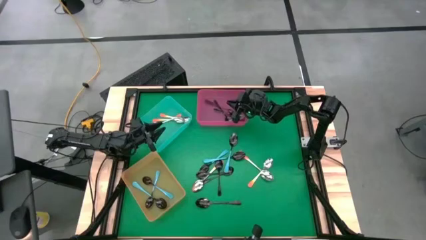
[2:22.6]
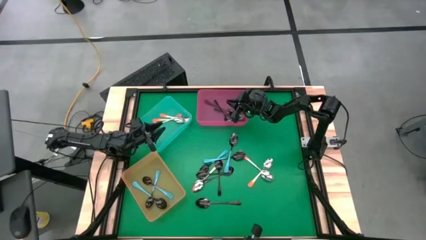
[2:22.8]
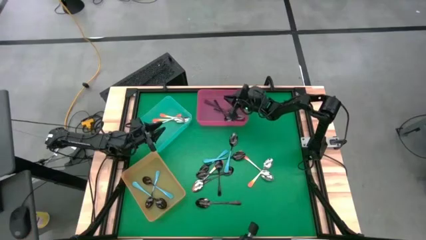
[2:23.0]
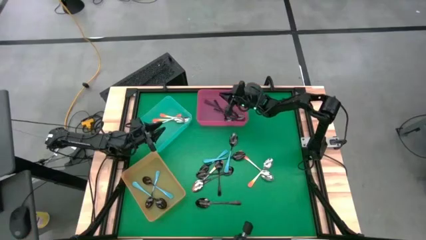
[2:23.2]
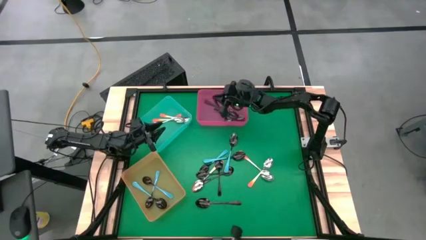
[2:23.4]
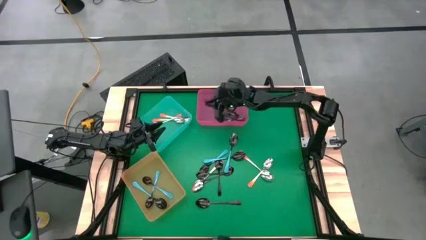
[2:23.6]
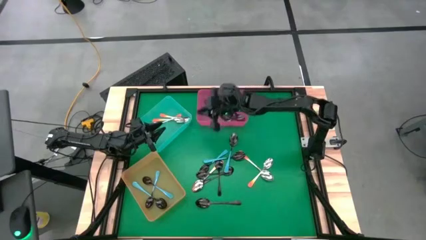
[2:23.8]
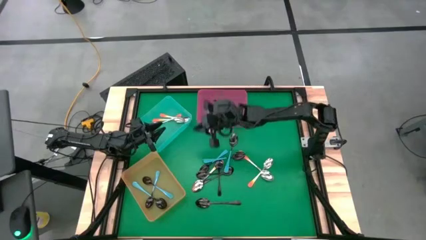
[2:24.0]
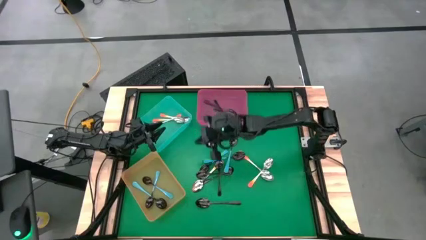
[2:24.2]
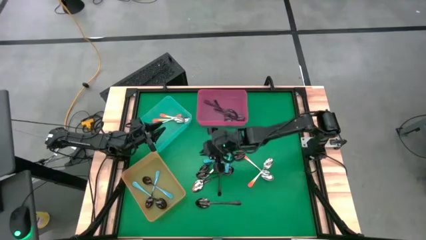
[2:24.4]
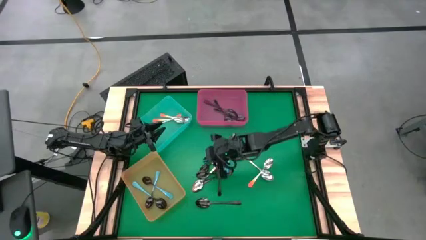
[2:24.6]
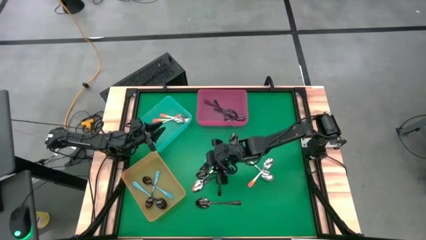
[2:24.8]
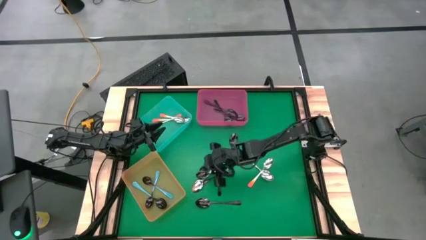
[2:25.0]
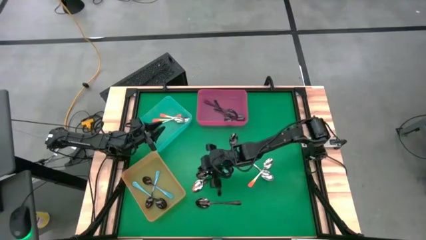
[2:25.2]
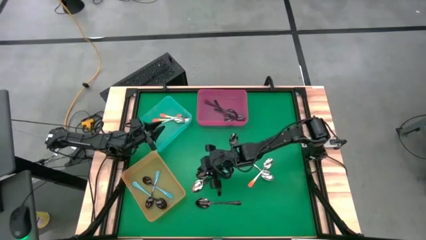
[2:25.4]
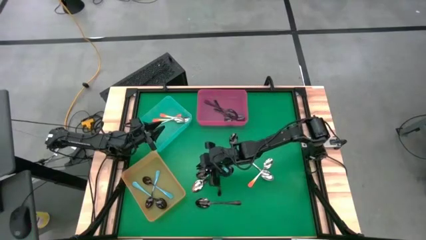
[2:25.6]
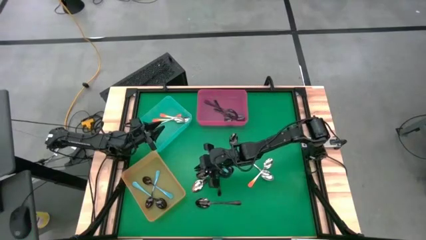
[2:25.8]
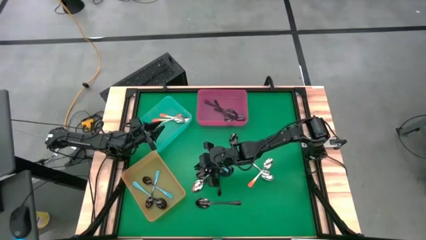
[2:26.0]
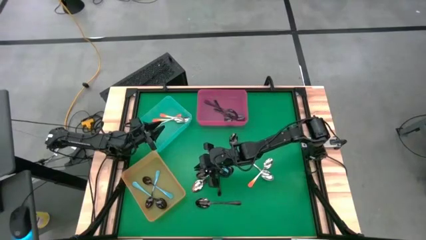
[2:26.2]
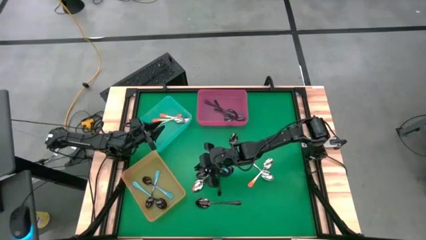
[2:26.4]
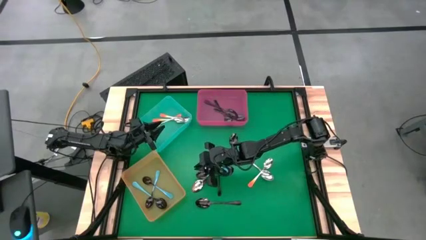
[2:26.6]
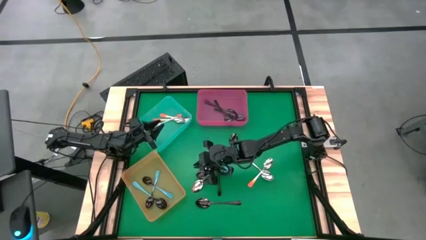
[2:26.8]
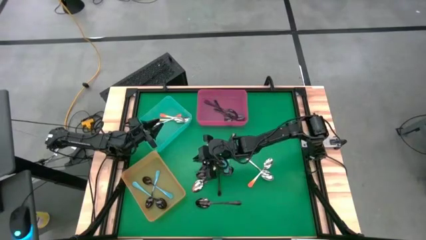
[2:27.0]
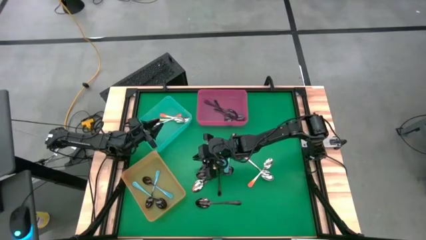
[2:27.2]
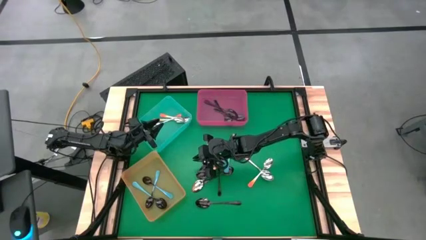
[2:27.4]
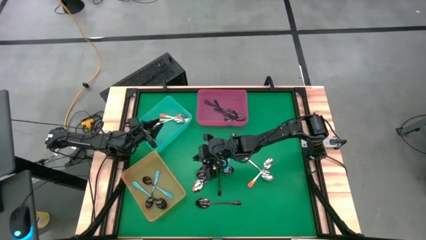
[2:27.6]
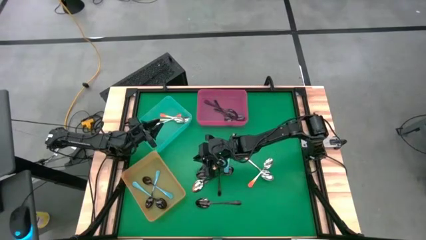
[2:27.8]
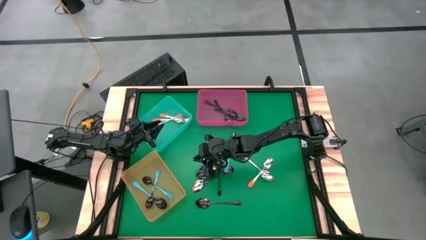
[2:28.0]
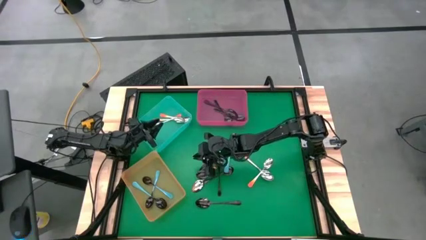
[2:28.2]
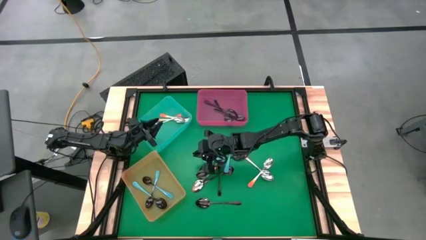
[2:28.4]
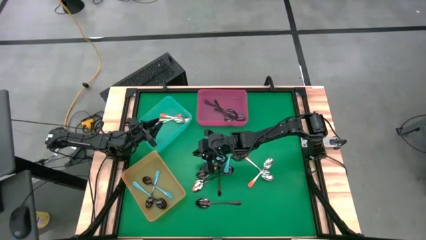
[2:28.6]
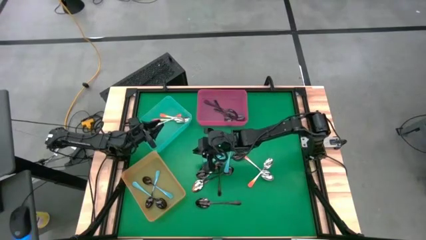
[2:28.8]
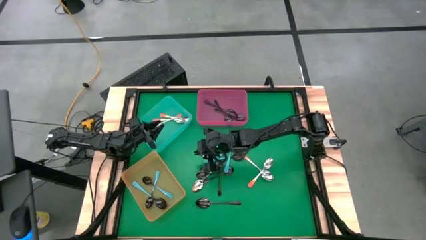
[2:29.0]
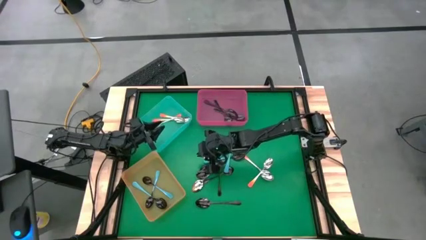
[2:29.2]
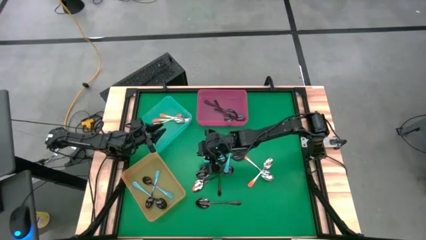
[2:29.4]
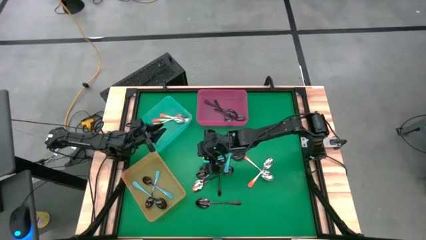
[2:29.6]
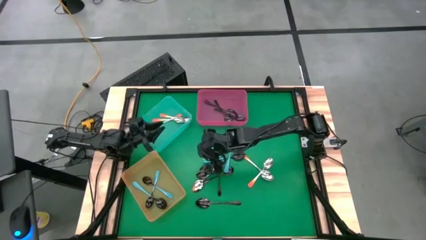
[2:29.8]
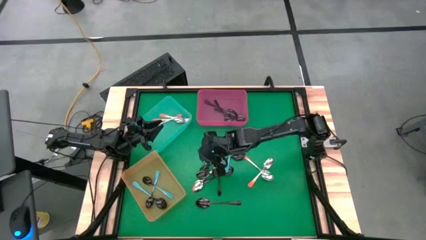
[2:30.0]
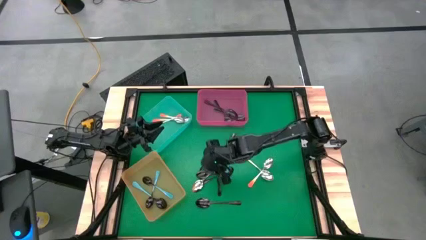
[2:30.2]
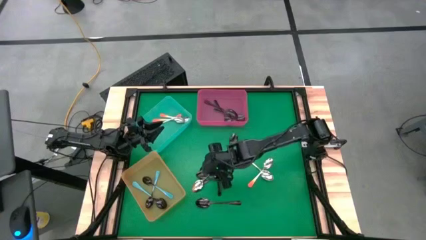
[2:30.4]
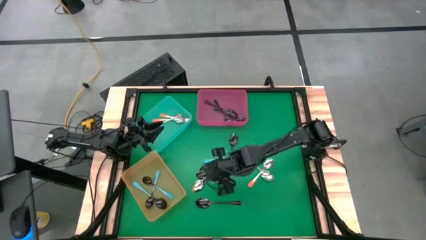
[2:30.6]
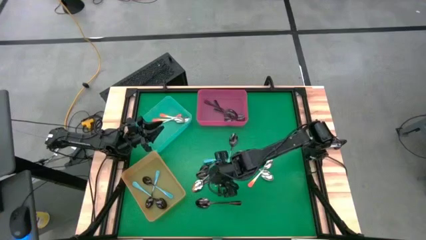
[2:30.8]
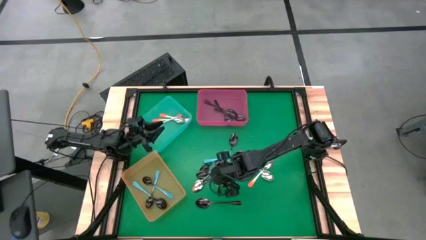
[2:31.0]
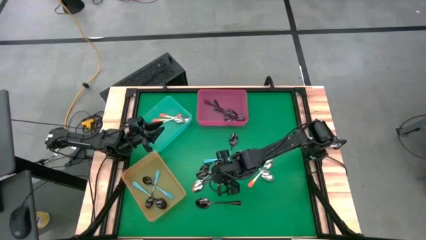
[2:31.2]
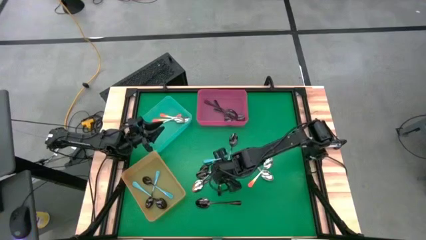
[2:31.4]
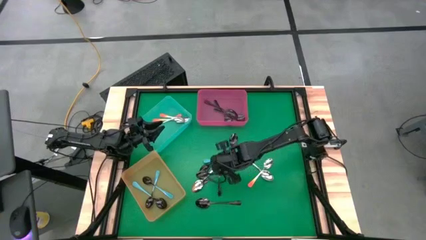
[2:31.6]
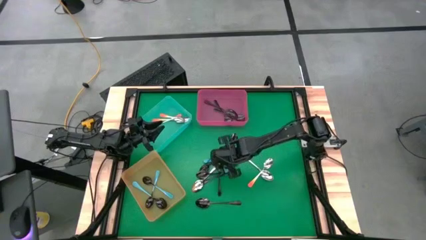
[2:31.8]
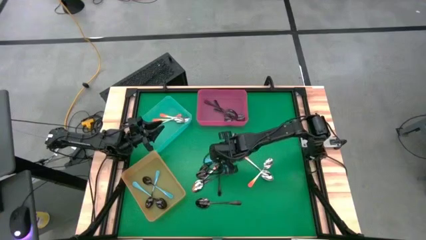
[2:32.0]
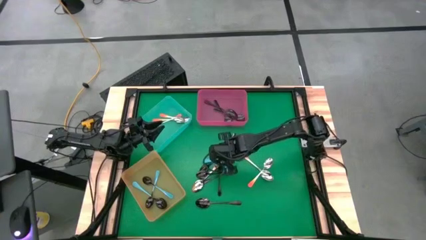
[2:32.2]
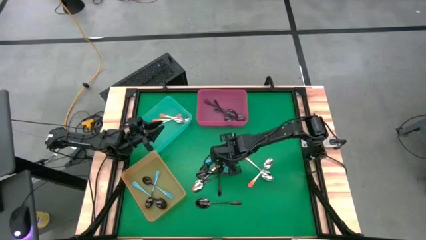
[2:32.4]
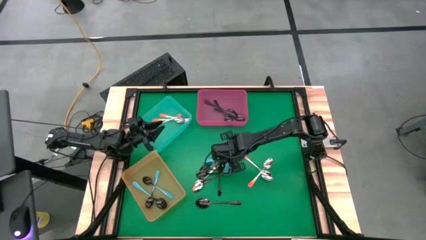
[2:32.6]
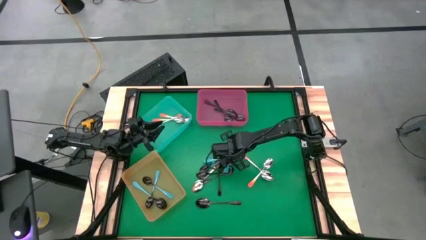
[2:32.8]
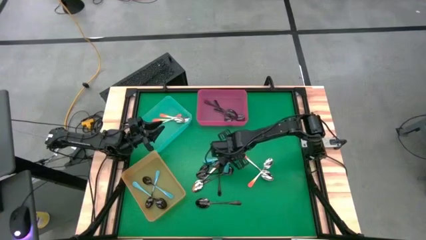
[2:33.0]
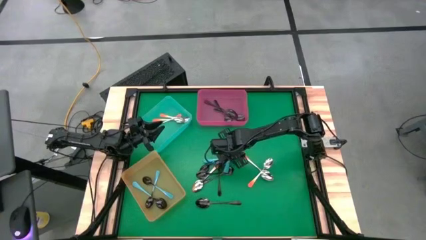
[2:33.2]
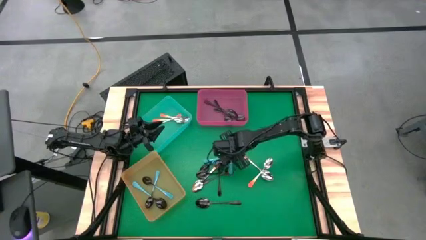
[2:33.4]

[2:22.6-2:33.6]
Task: Sort silverware by color (type)
Put the blue spoon into the orange bin

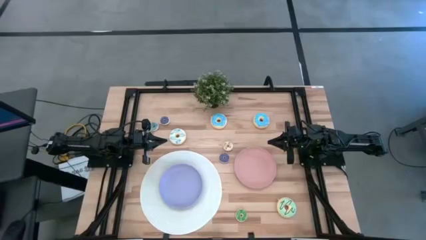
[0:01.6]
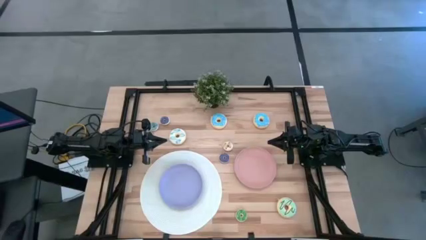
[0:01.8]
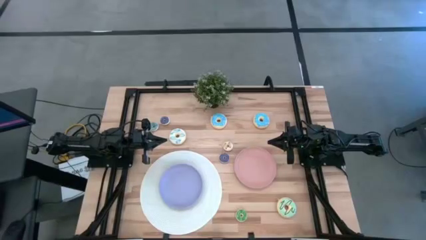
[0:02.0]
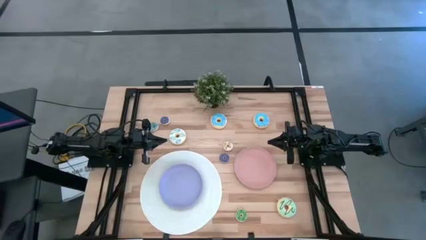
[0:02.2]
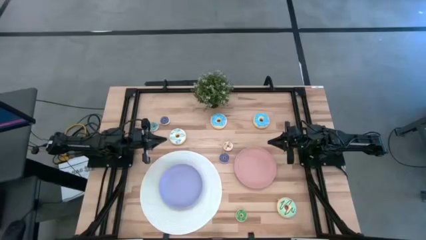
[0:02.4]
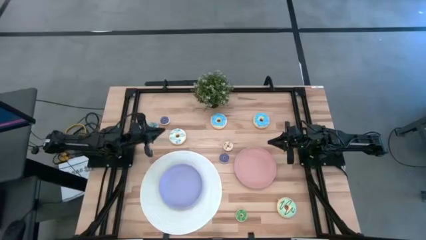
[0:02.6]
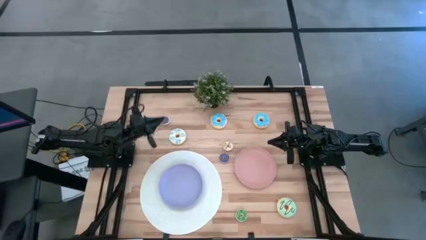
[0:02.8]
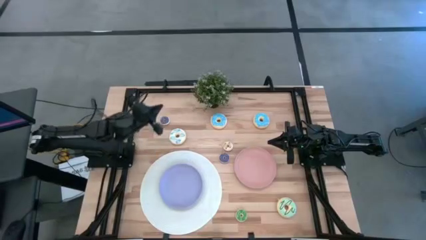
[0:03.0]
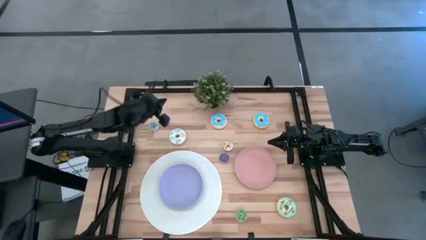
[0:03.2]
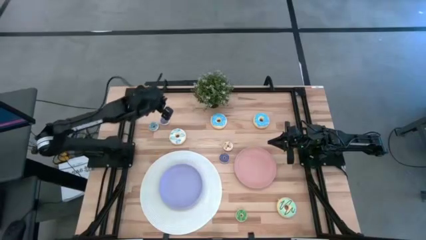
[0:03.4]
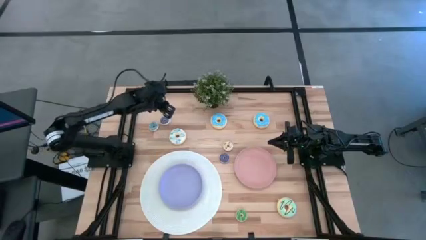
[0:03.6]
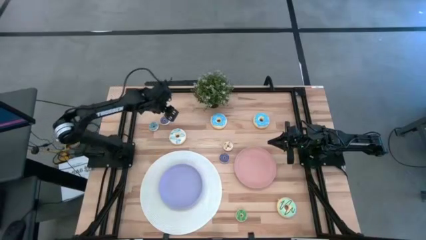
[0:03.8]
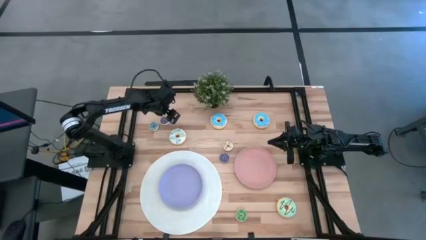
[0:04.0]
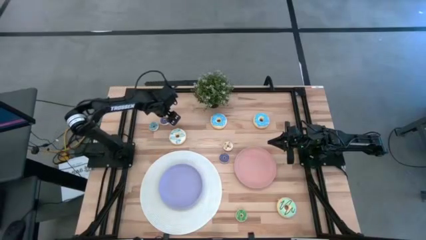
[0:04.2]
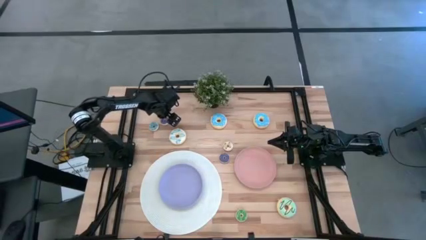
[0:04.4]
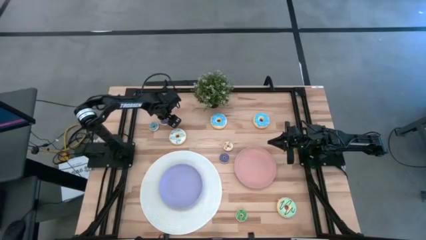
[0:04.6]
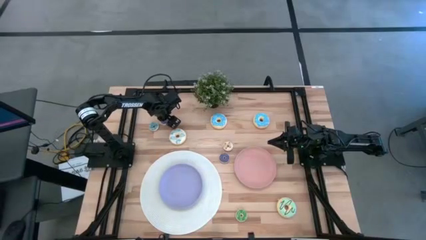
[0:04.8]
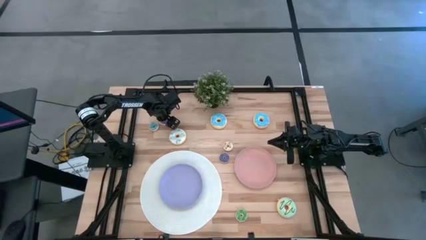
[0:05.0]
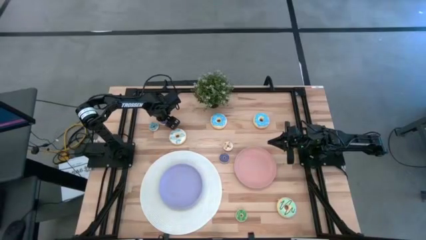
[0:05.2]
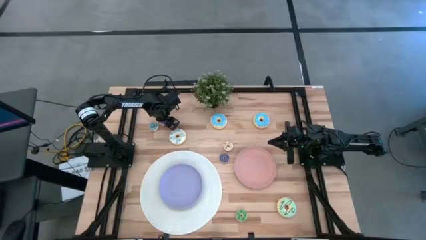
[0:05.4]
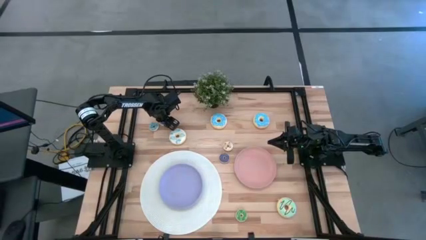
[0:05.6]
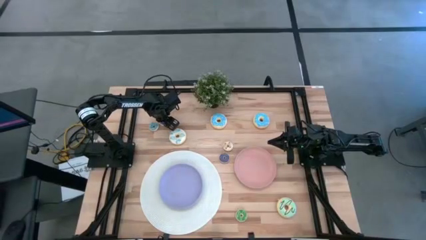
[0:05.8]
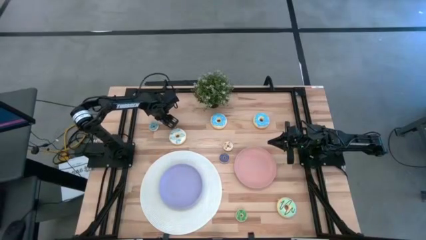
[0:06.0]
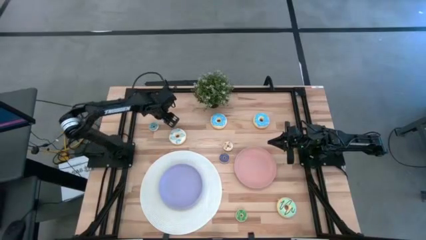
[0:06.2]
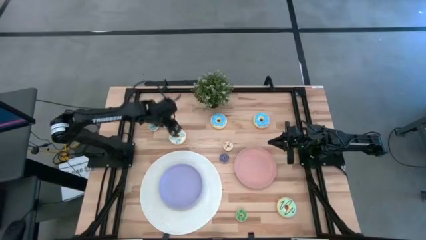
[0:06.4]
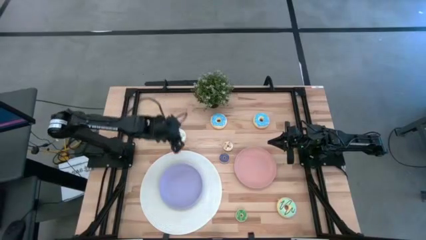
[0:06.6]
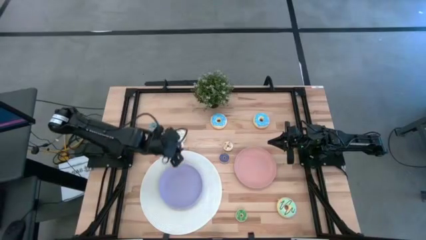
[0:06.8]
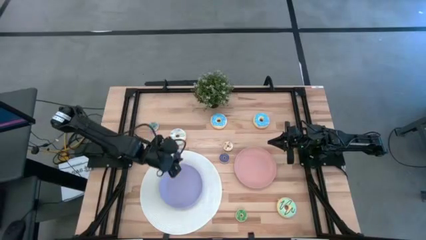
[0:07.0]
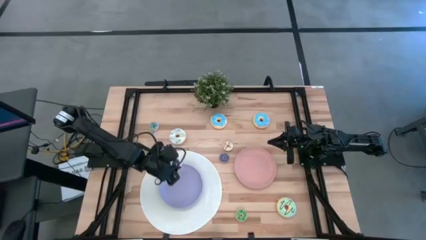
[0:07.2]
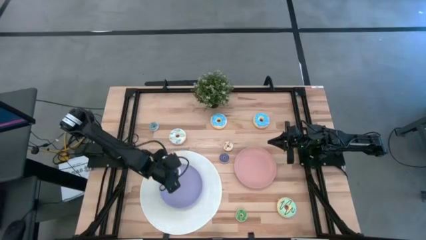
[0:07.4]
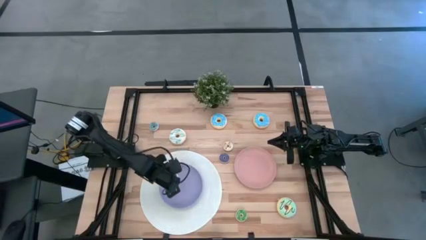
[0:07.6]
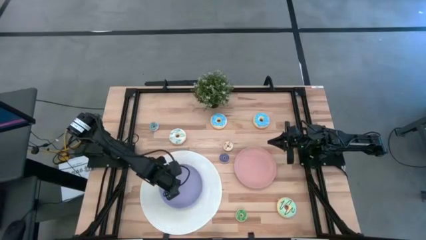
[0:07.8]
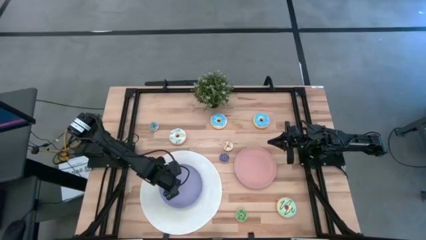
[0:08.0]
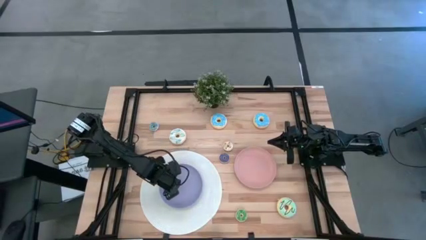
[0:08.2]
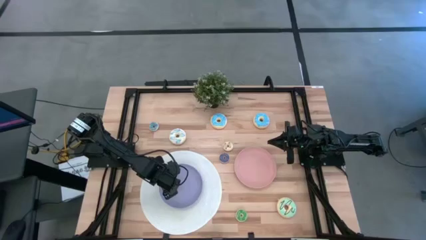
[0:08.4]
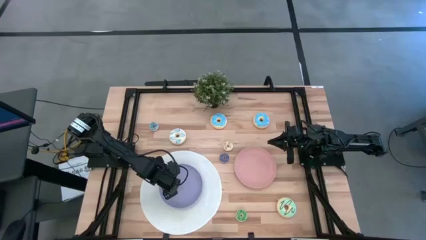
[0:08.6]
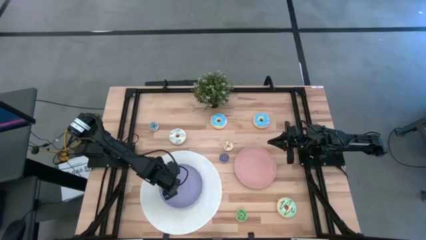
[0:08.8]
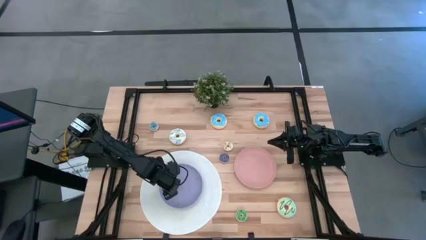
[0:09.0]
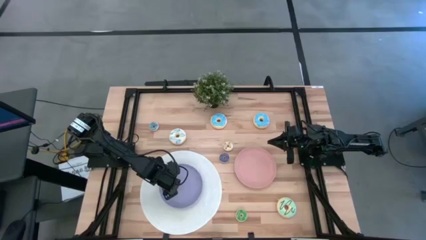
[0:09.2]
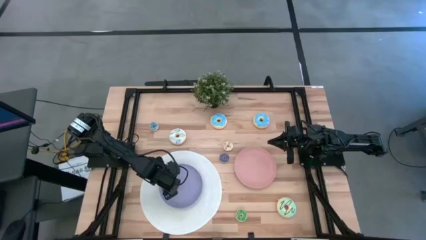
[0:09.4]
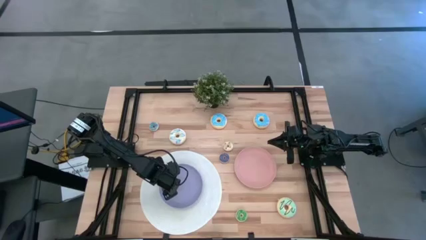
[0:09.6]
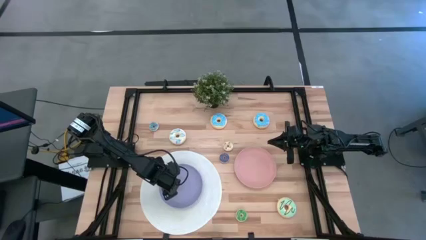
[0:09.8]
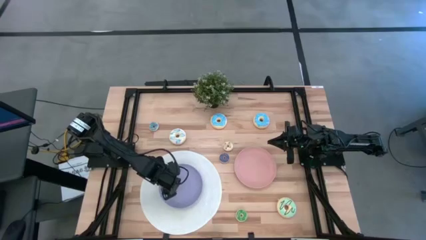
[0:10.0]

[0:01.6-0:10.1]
Task: Pick & Place donuts
Put the top small violet donut on the violet plate
